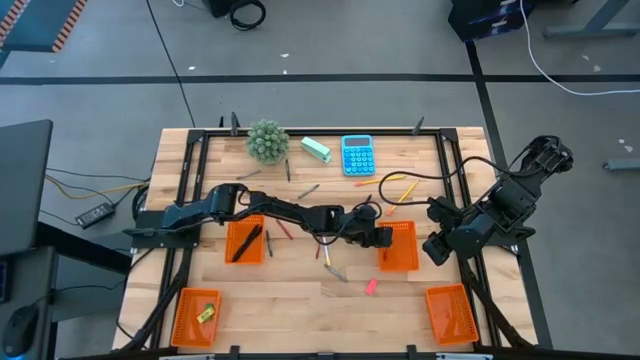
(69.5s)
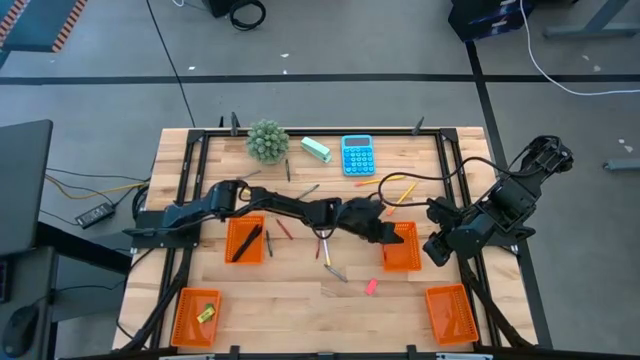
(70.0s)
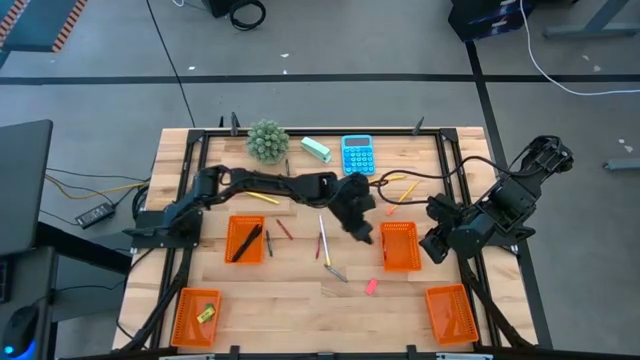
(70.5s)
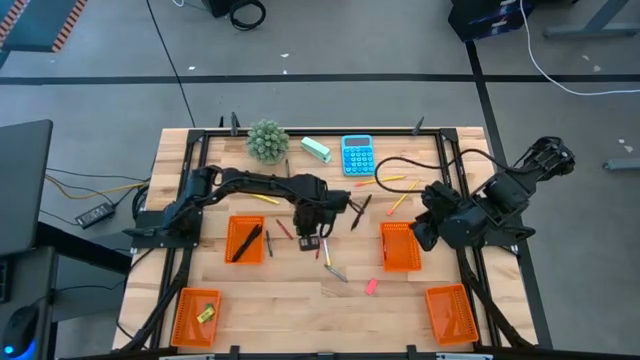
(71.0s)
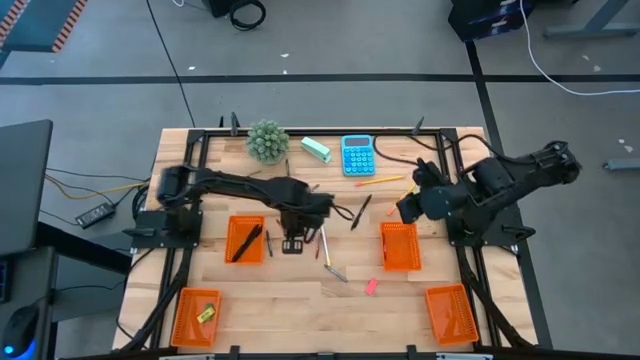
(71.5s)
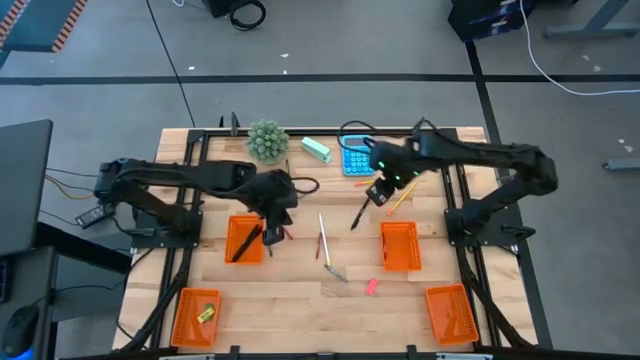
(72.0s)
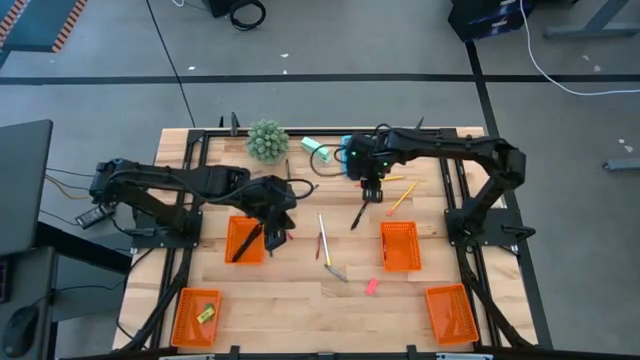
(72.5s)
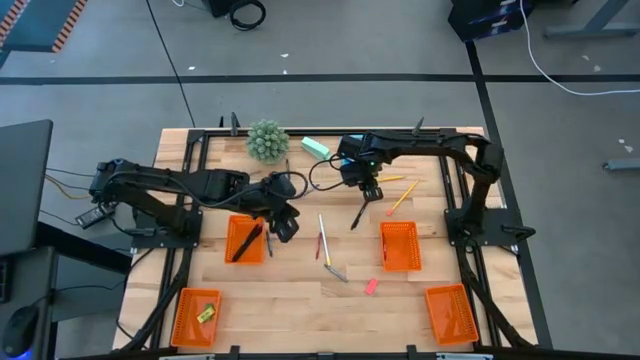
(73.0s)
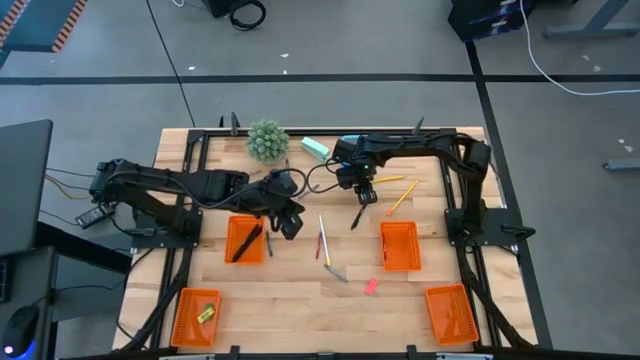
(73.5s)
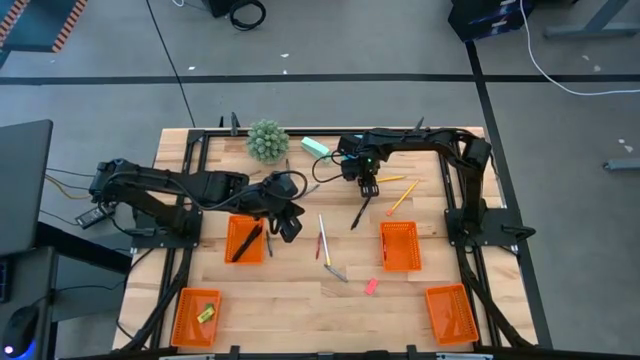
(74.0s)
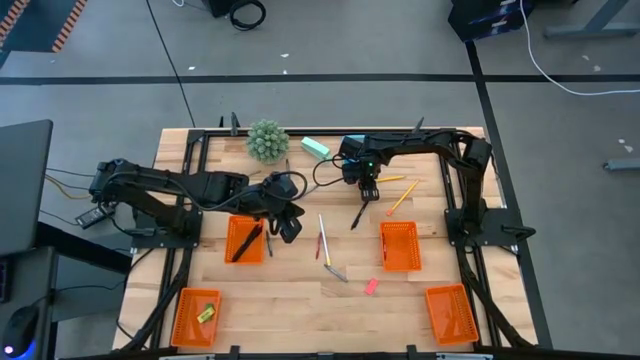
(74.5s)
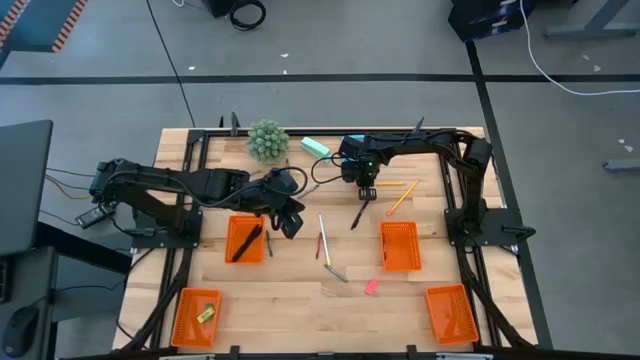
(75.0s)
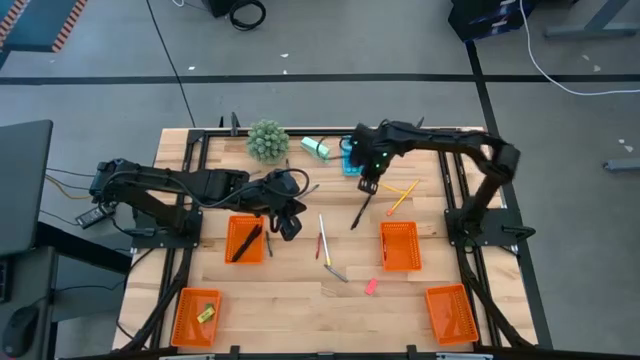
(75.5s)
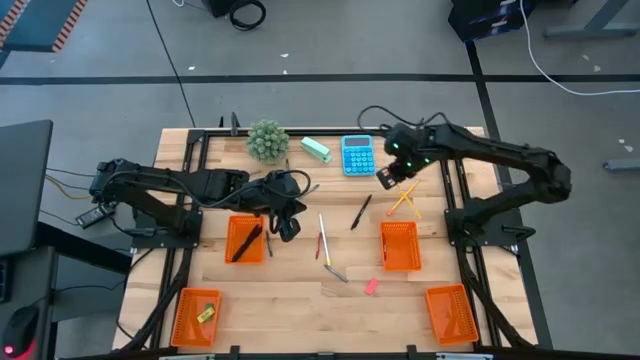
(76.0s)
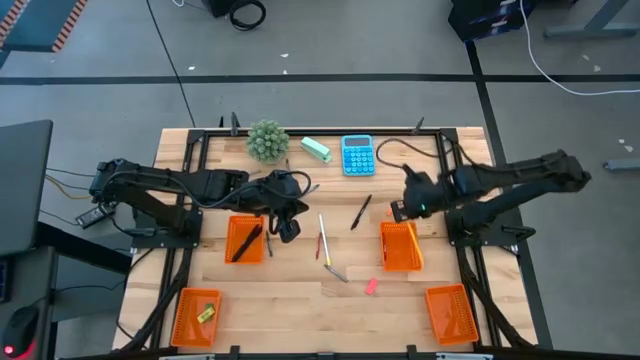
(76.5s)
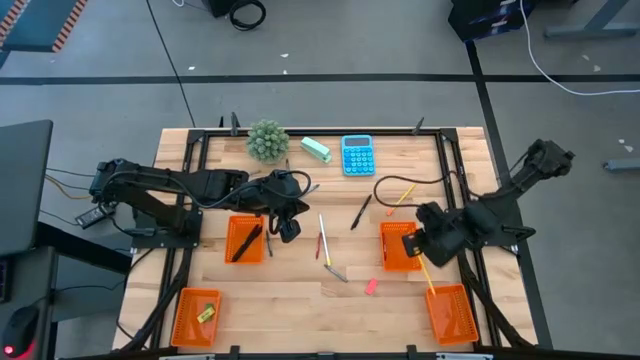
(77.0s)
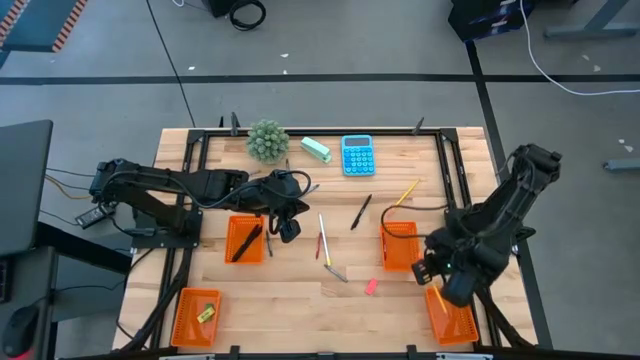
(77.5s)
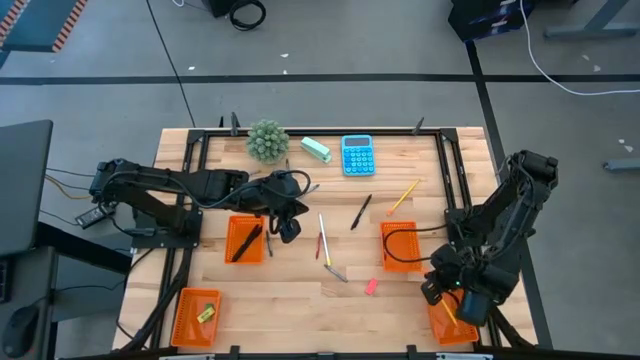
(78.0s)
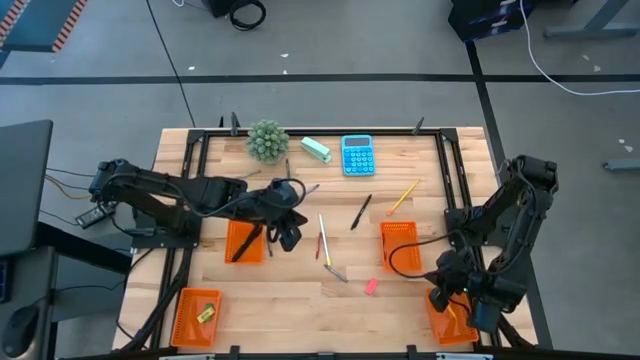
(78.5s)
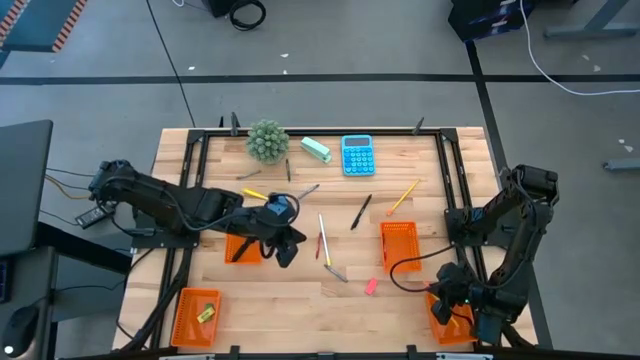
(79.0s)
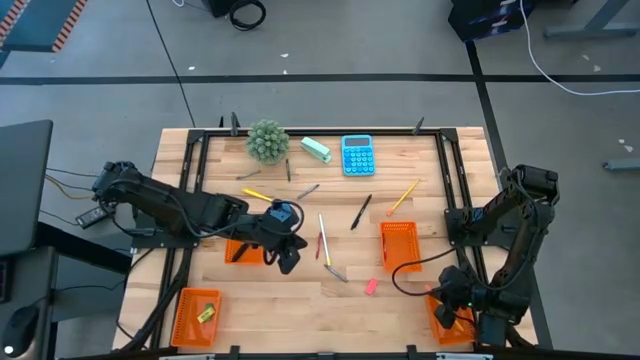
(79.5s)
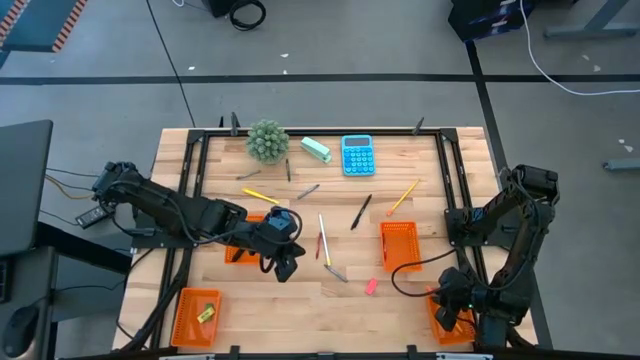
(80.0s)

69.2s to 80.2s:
Task: Sort crayons/erasers/pens/pencils in bins
Put the left yellow pencil into the bottom right orange basket

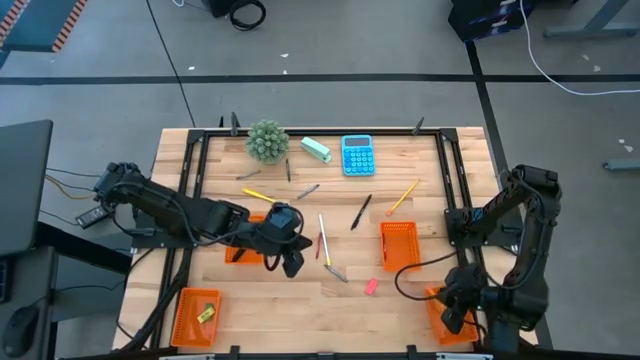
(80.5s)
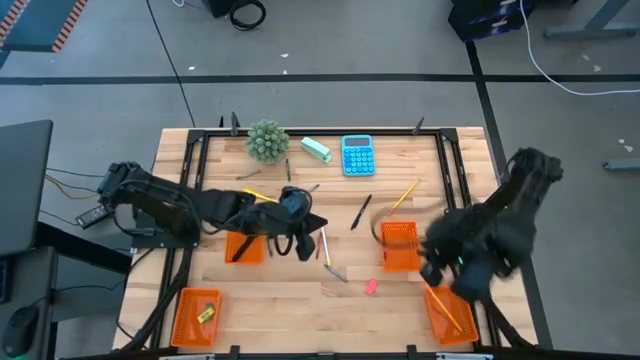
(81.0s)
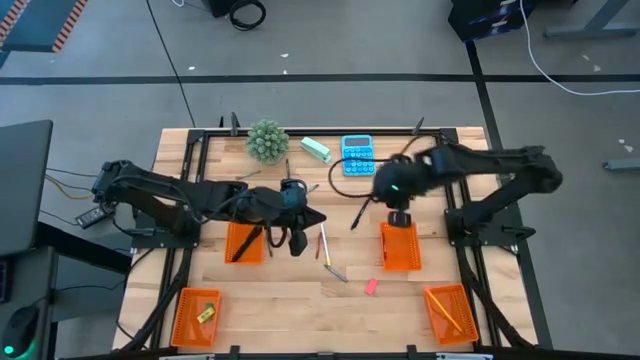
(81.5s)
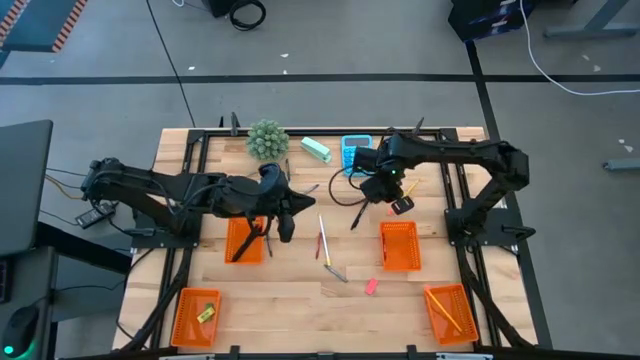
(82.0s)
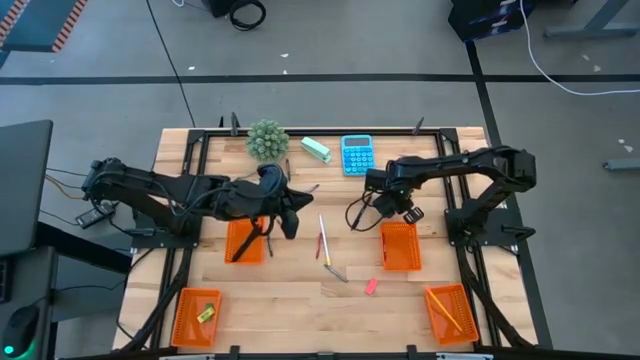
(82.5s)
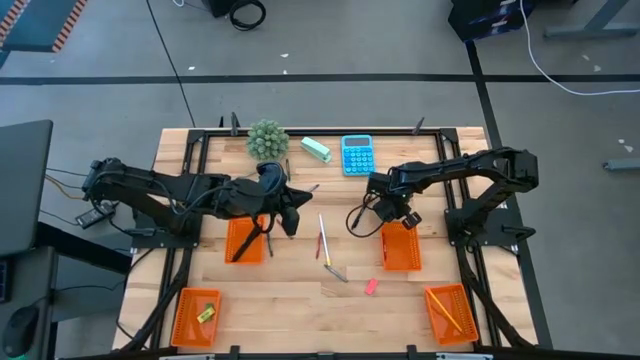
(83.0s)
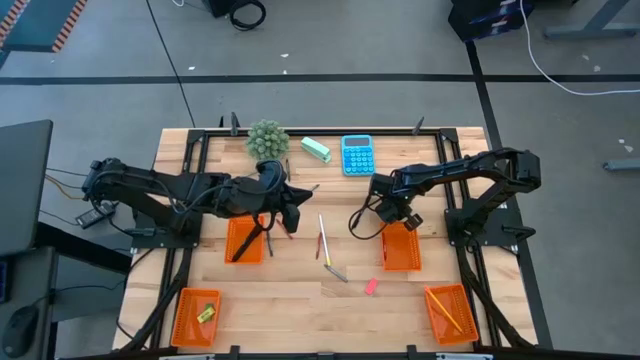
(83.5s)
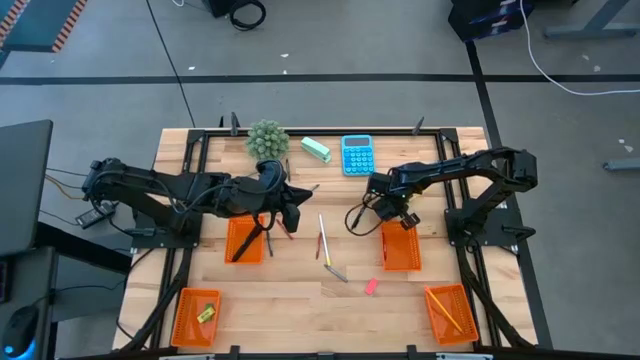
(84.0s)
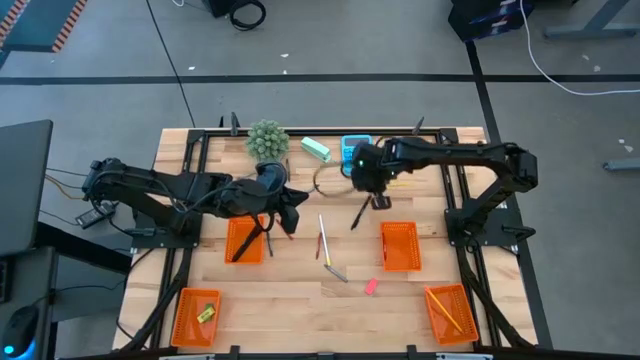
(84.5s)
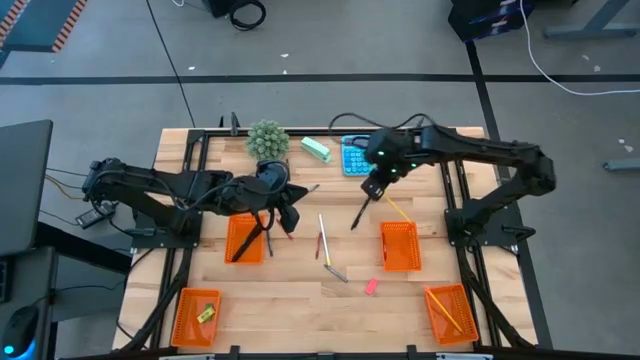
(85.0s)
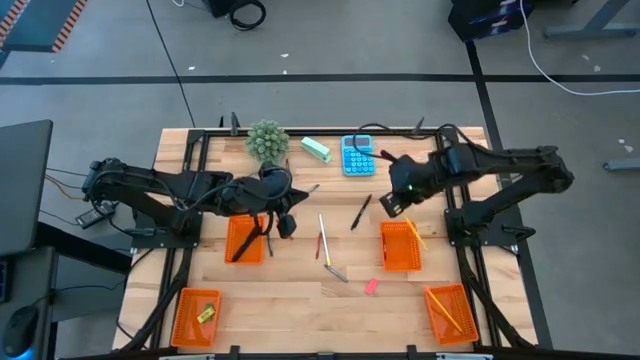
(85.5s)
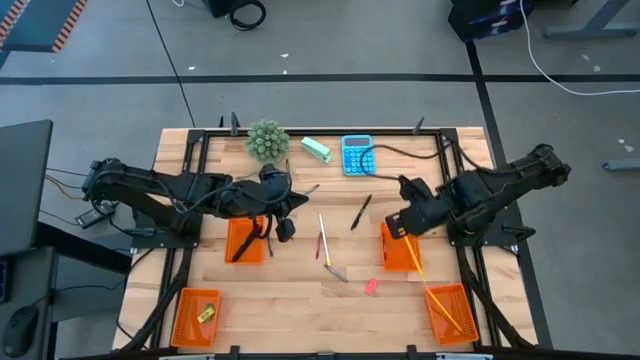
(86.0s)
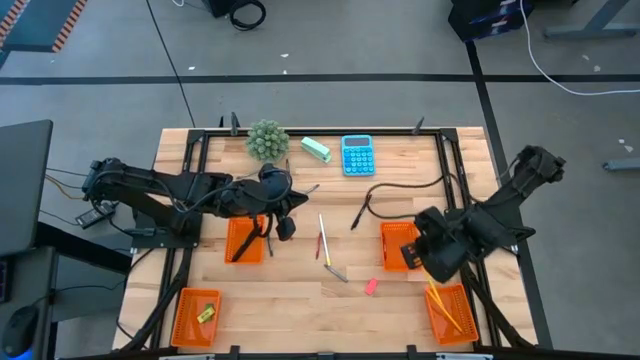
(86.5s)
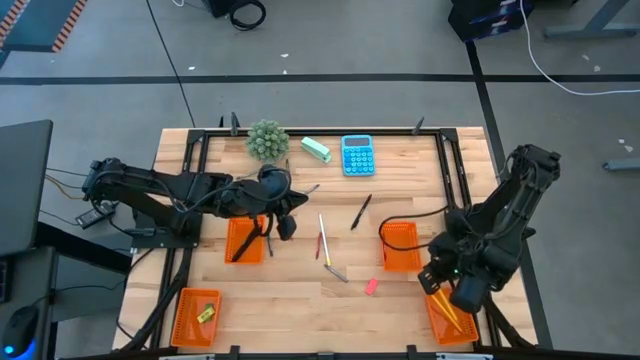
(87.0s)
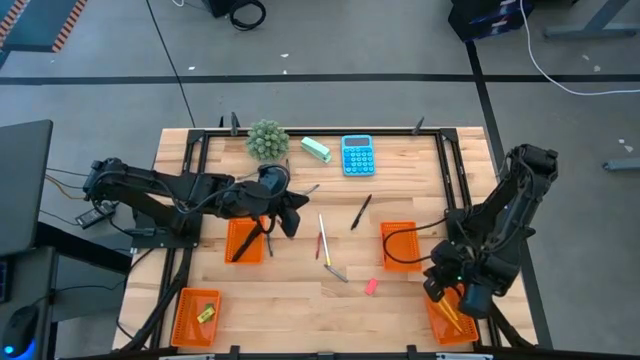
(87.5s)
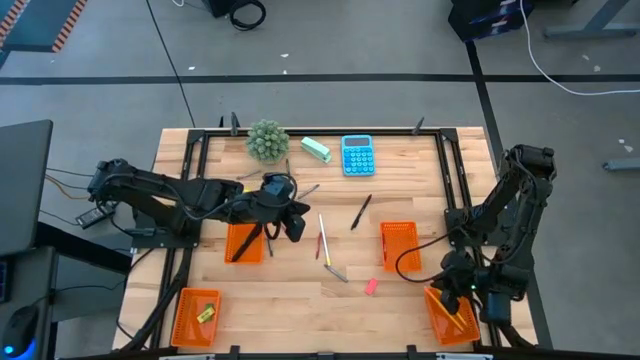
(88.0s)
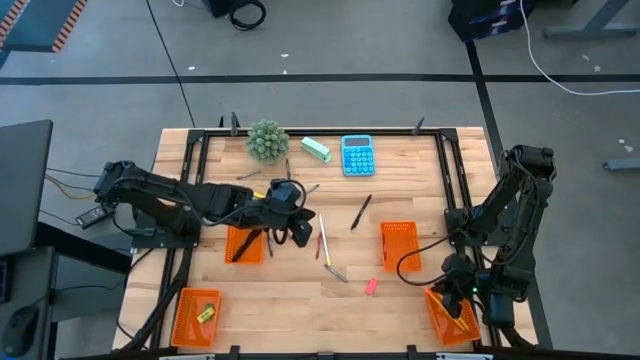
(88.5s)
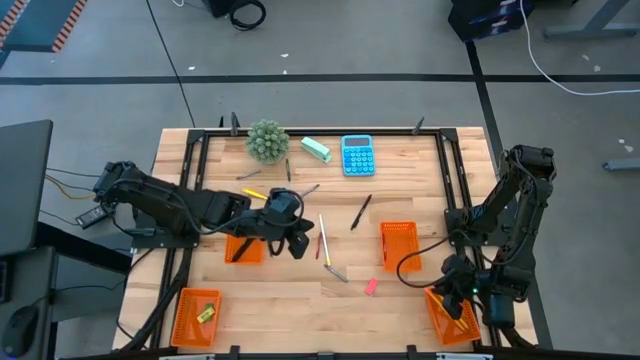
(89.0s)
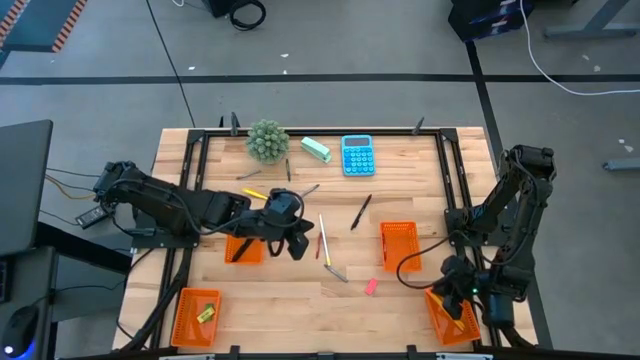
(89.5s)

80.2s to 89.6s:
Put the yellow pencil into the bottom right orange basket

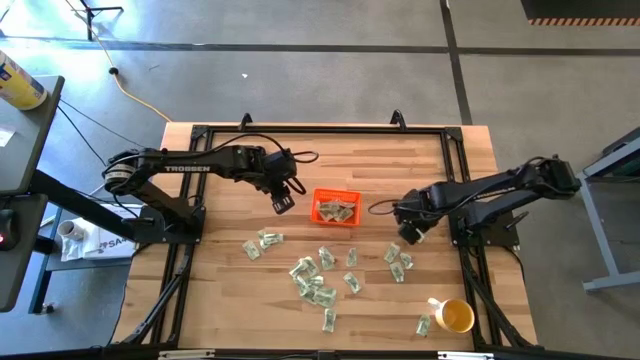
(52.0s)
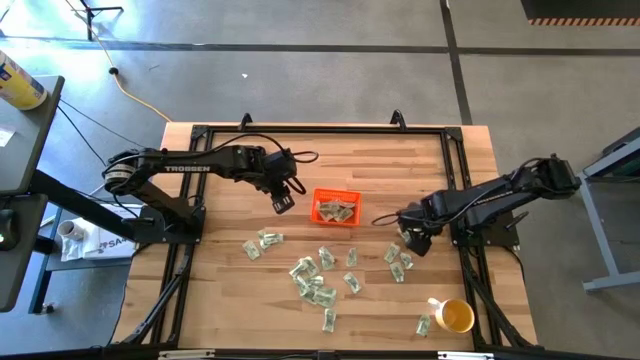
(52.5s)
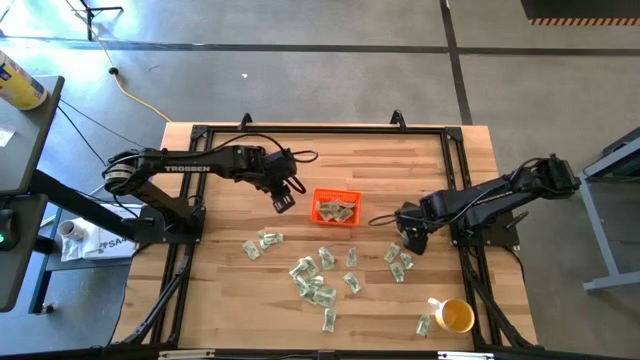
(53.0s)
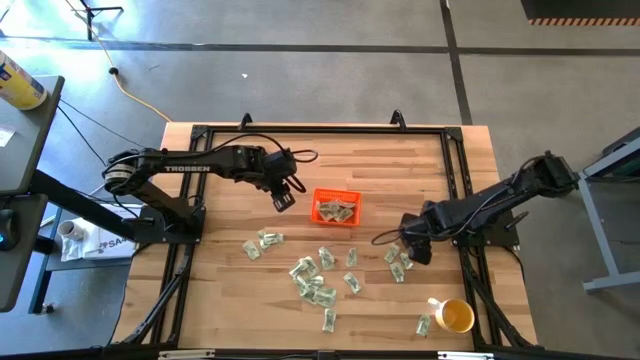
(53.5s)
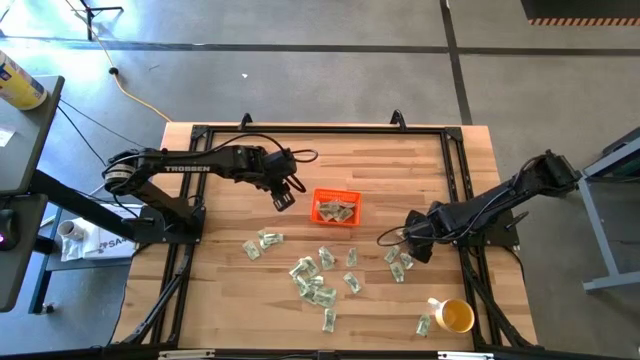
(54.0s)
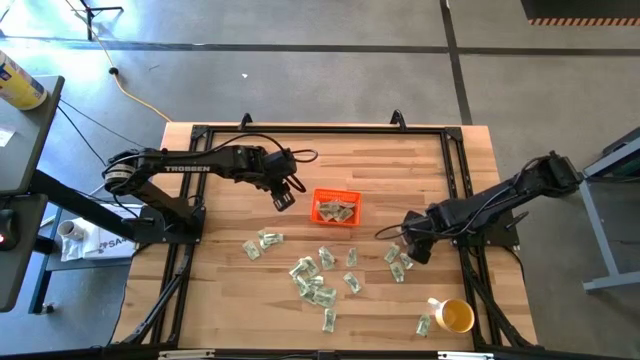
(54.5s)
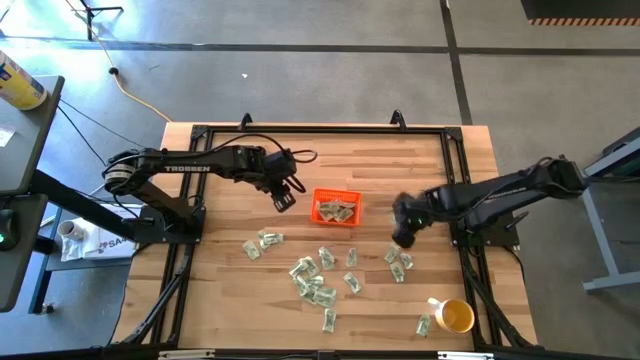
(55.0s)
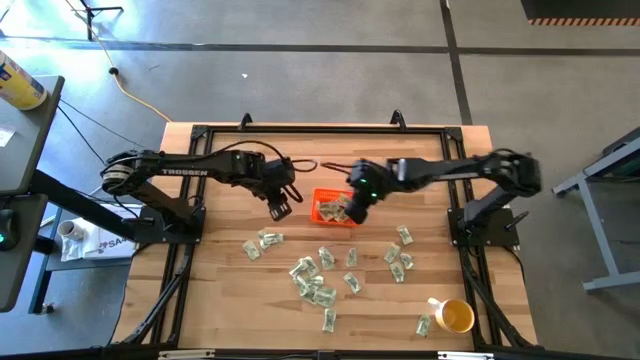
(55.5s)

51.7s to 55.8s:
Task: Pick and place Stevia / Truvia into bins
Put the stevia packet into the orange bin
